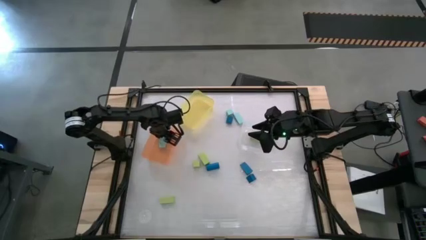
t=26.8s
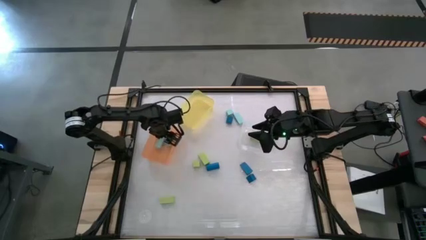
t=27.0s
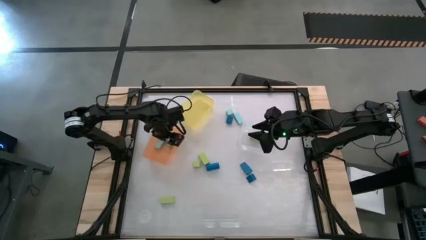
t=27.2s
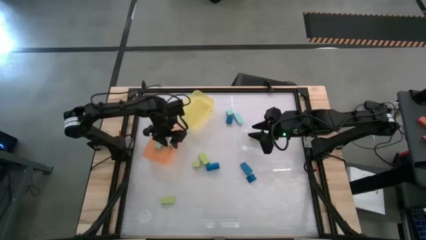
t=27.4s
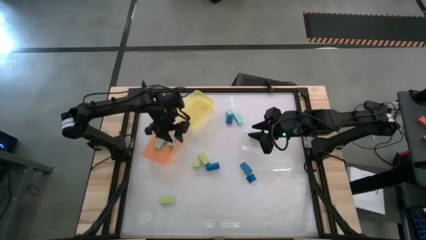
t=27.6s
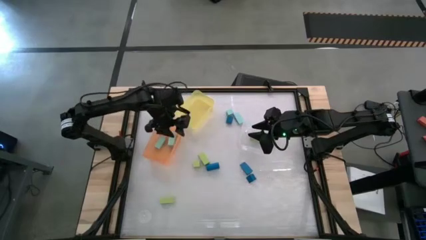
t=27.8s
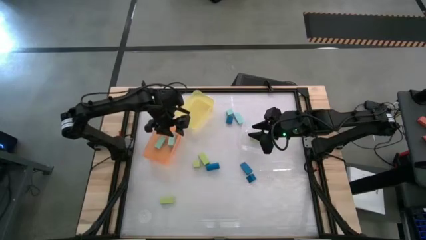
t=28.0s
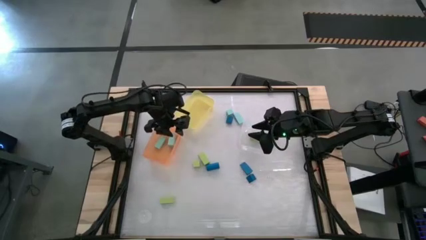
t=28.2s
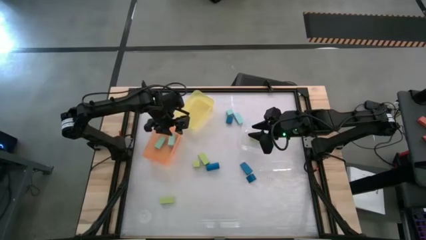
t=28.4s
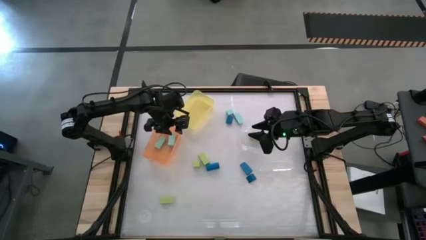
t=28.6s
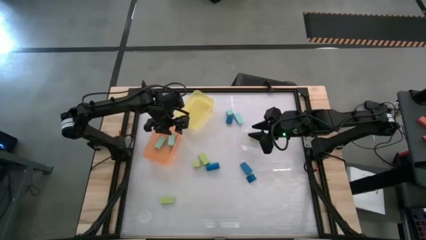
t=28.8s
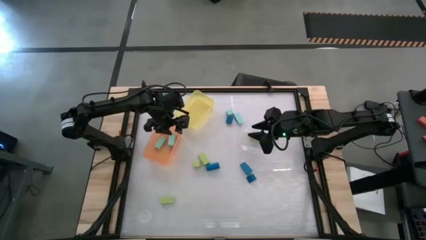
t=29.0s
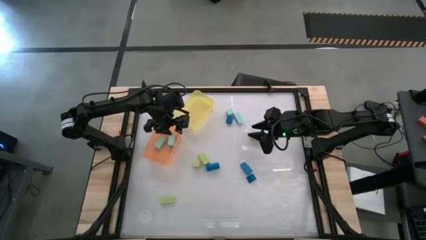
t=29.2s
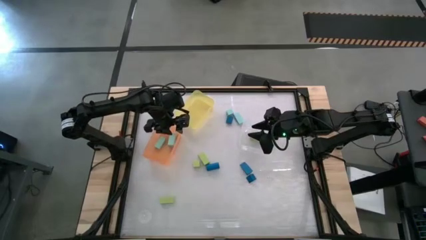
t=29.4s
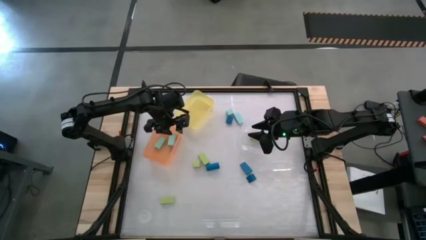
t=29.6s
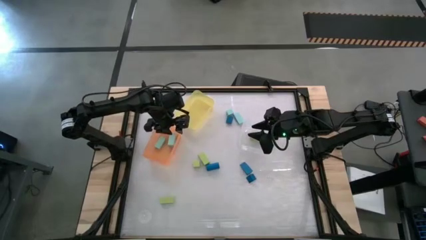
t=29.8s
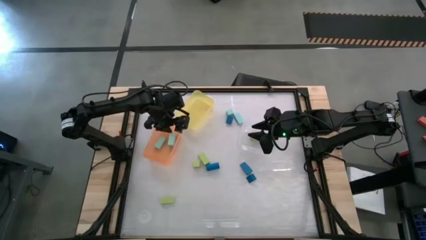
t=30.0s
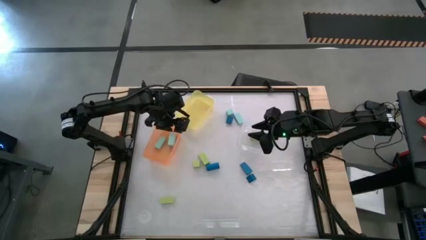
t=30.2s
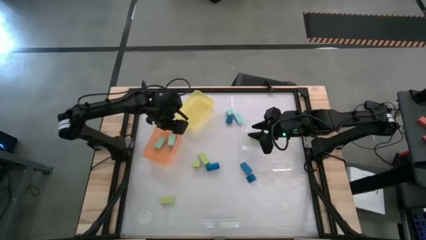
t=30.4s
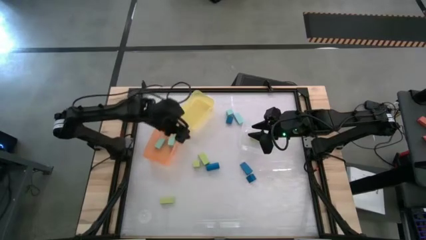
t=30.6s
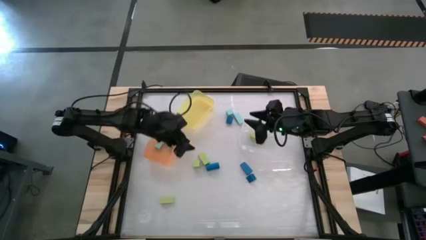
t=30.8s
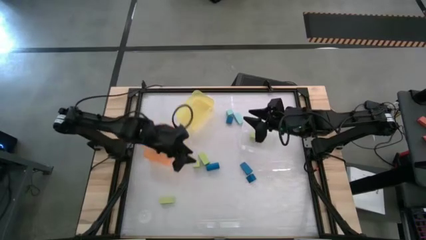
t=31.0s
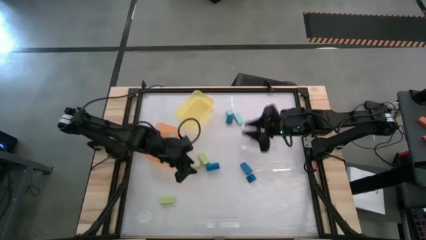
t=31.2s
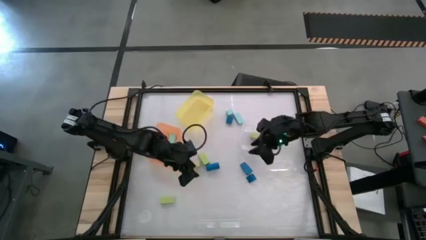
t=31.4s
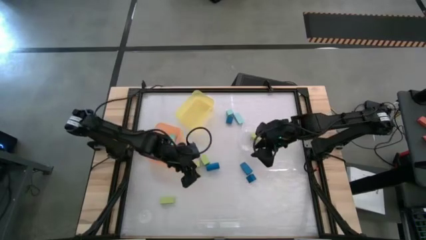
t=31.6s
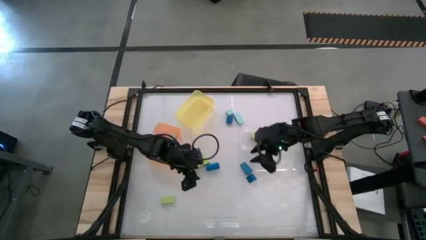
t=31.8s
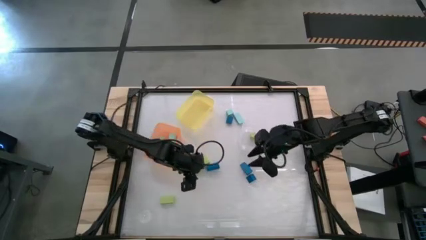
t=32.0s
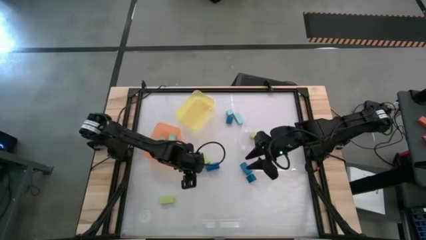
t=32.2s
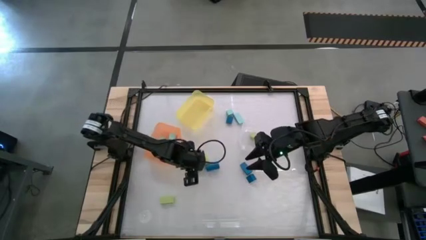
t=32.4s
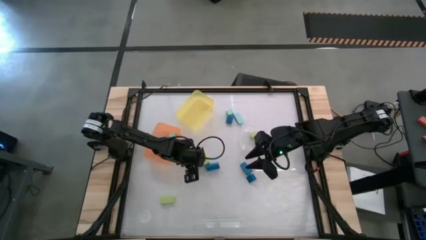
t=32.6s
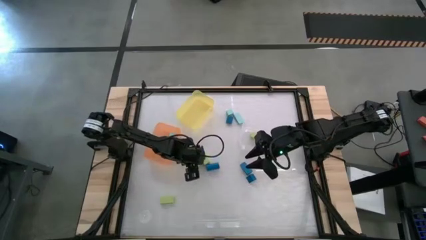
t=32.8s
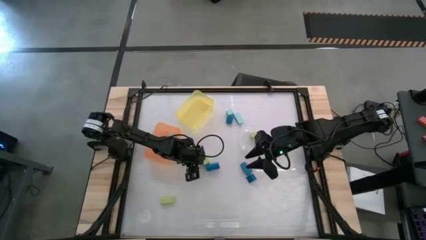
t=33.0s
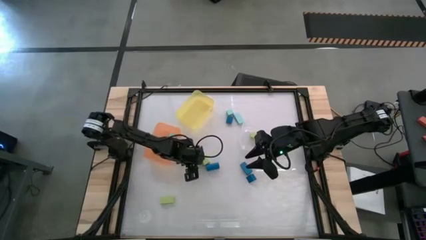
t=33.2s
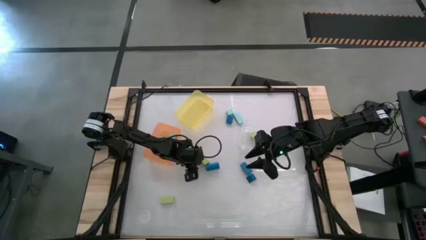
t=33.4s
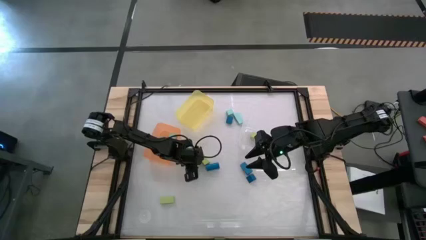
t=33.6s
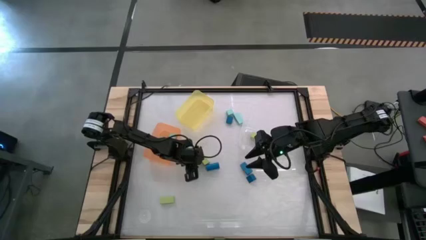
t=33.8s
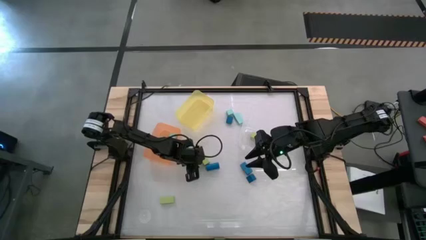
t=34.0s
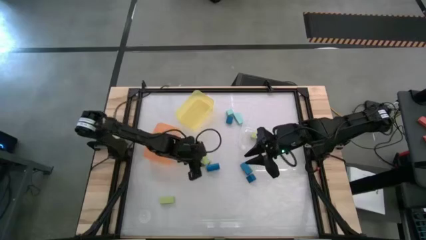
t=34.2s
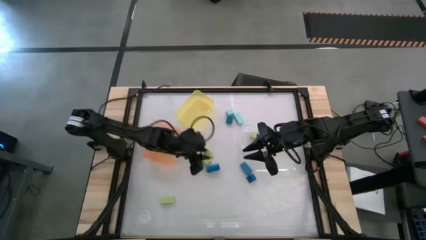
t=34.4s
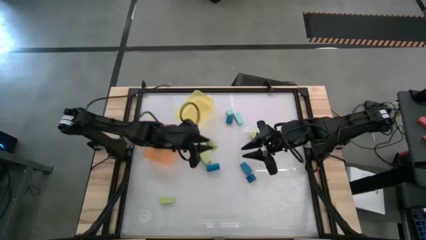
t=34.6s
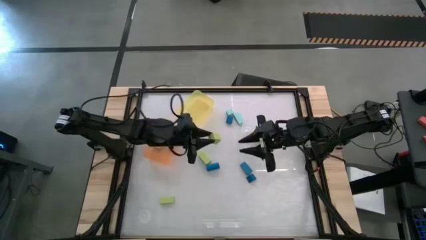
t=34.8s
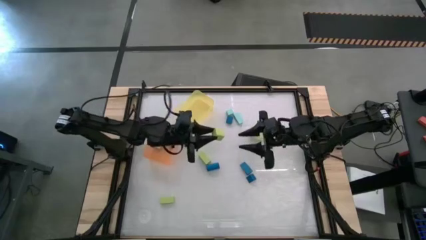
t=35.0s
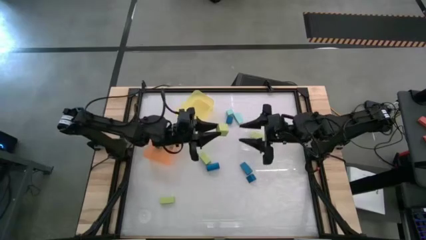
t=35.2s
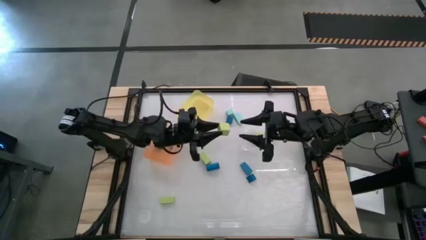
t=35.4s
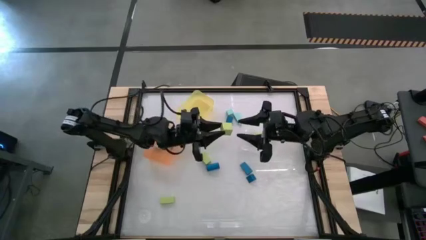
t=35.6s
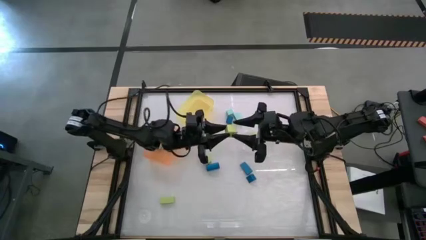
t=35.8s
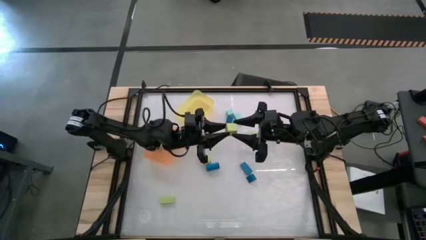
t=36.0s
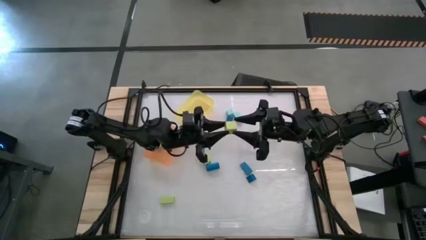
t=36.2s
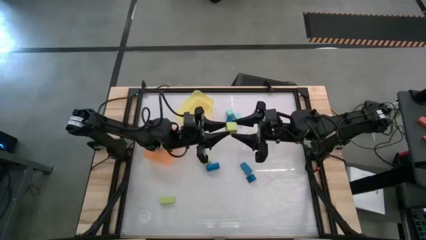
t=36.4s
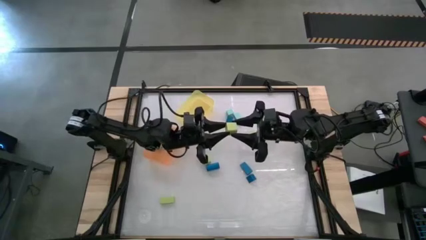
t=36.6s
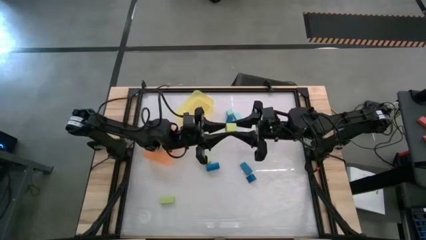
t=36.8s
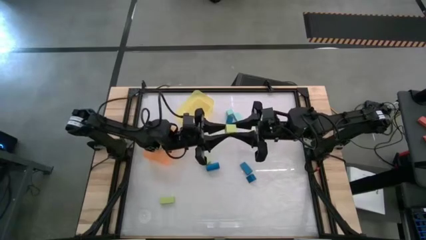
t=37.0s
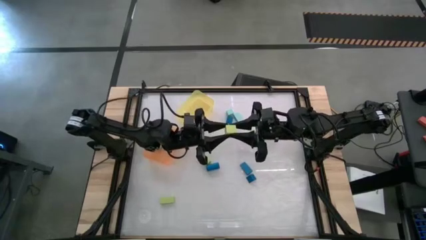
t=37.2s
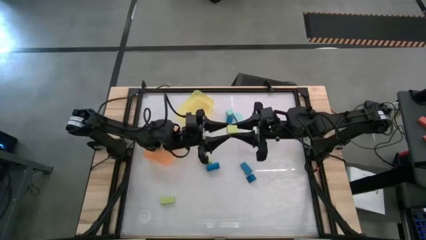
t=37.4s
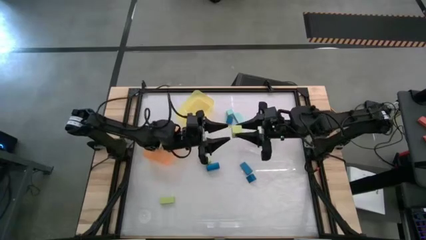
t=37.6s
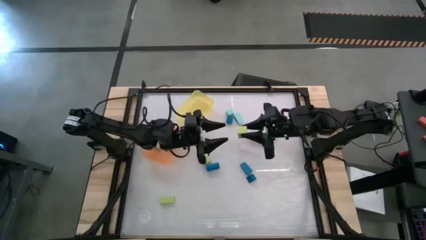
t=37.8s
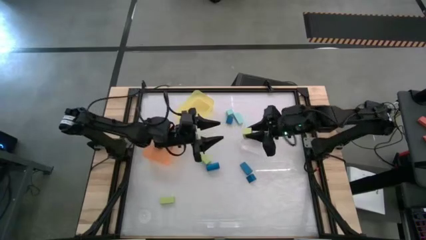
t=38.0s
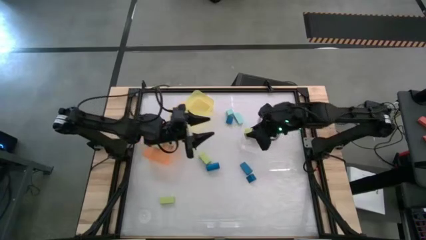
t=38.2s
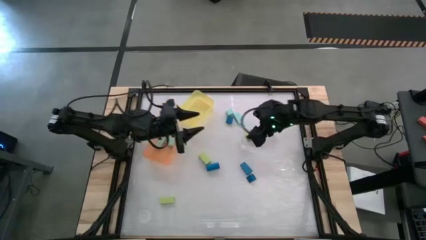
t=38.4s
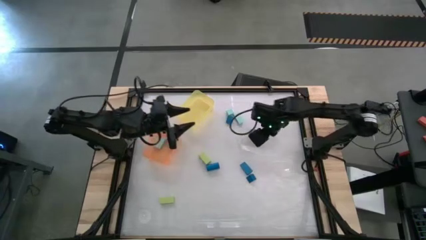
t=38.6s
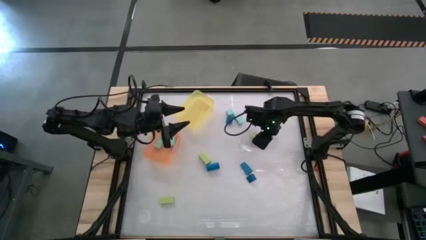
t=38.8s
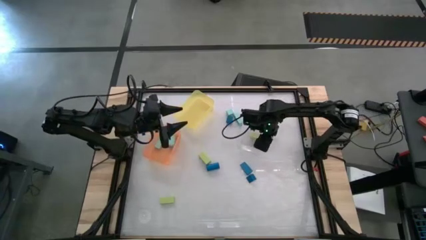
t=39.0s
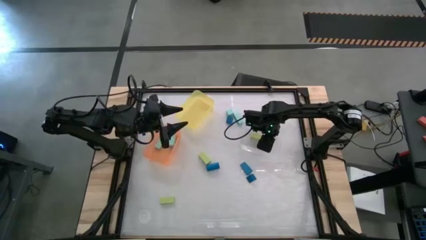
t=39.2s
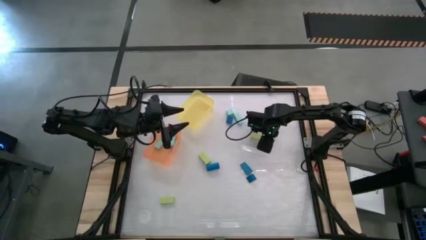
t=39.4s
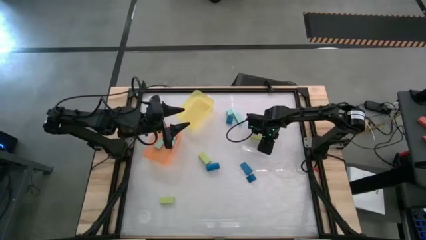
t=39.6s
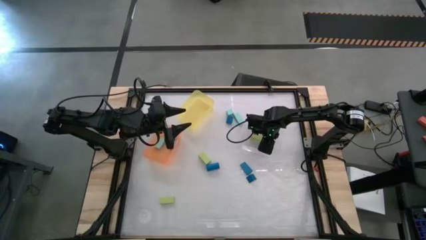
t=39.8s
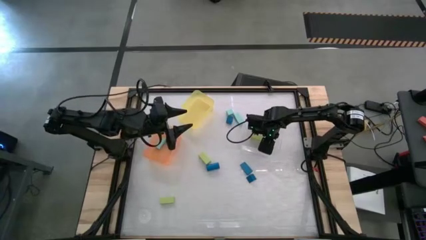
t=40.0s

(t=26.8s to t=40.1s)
Task: Sort & place blocks by color
Put the green block into the transparent bin

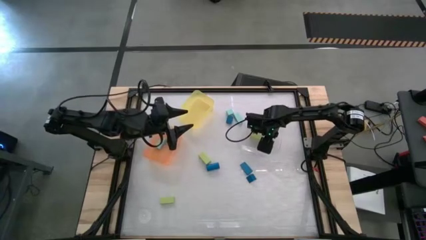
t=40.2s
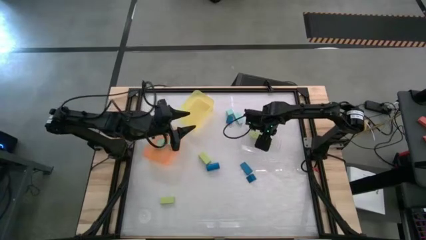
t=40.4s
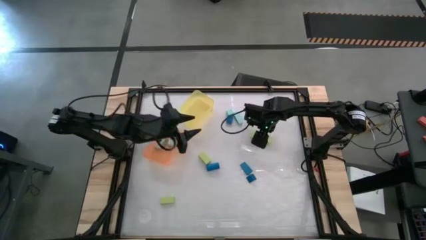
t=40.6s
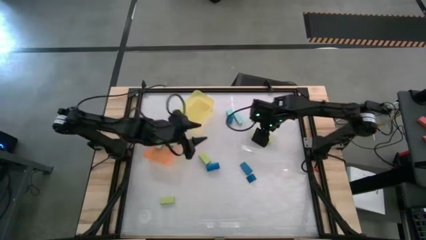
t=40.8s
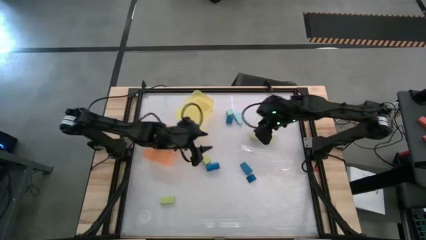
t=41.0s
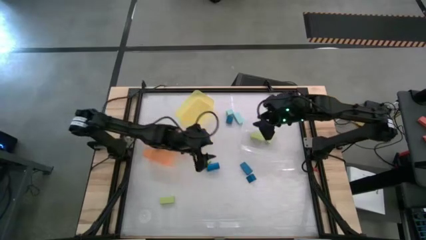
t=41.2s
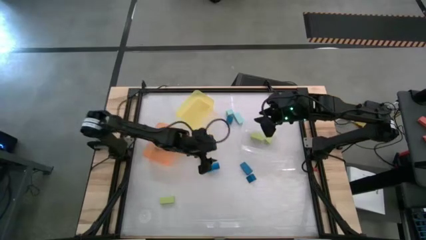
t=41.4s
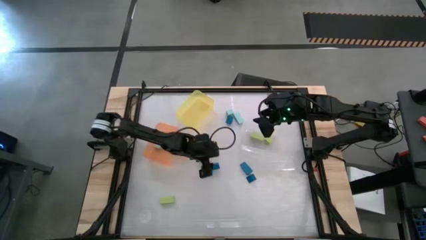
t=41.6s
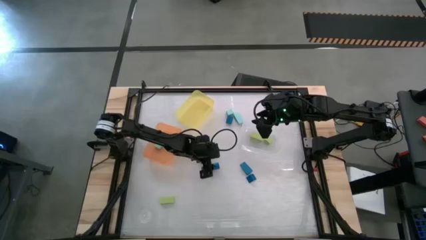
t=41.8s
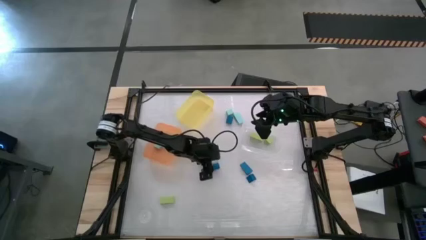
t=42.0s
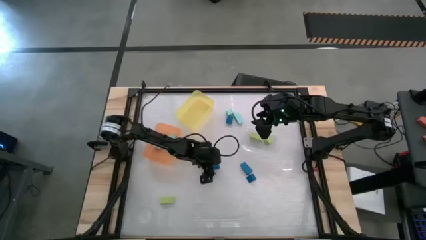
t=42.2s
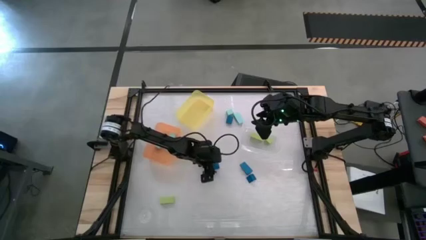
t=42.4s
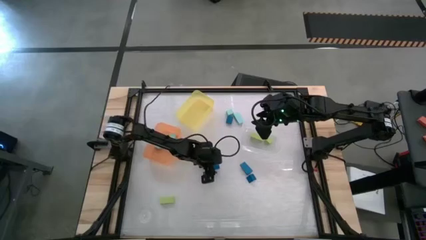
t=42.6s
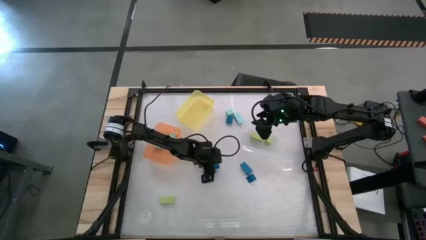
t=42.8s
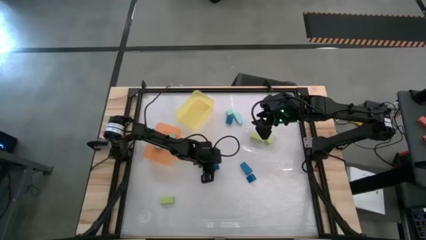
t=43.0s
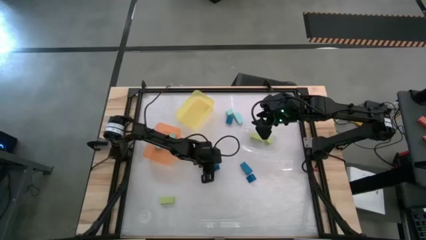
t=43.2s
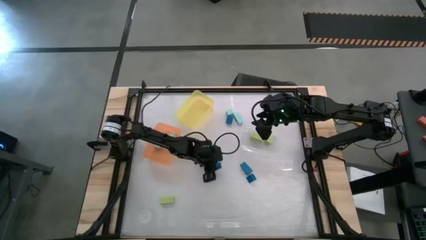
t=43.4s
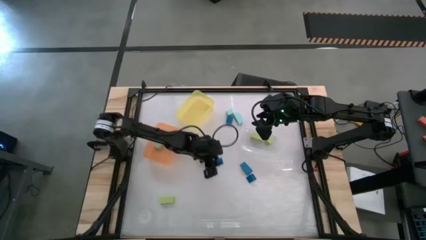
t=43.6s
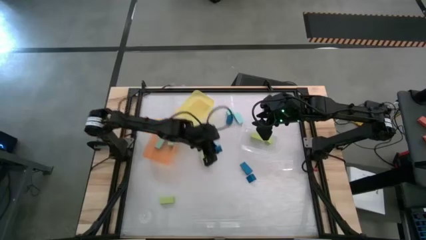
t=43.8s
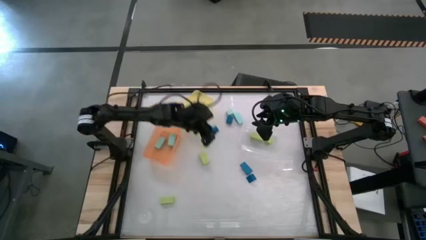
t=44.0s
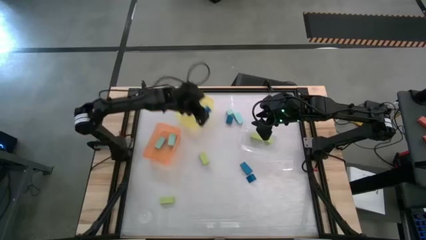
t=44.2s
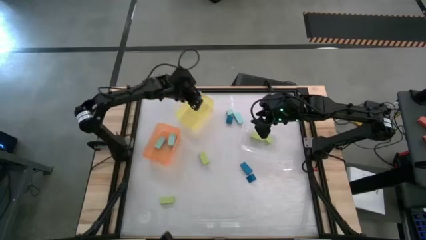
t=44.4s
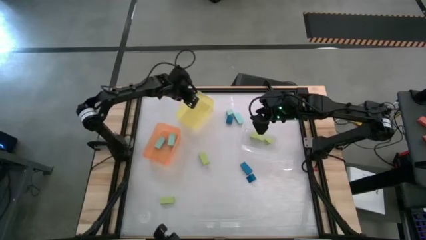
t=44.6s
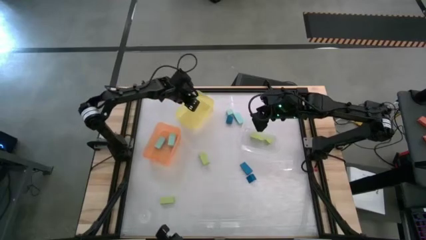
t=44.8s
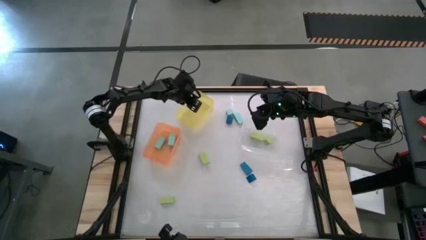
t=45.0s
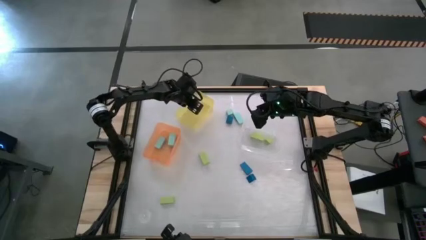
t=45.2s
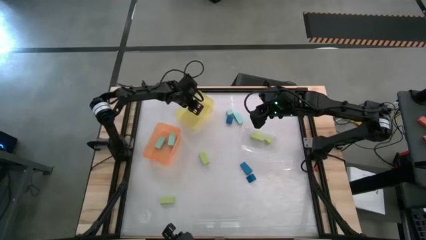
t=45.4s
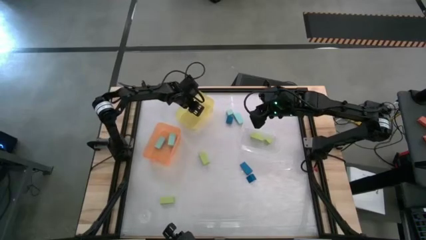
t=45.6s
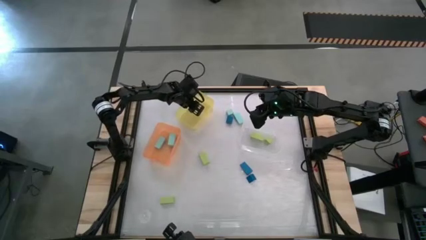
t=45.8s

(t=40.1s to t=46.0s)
Put the blue block into the yellow bin
